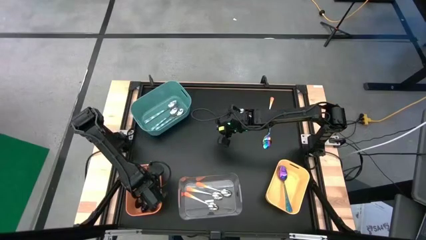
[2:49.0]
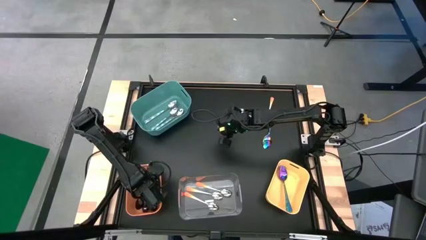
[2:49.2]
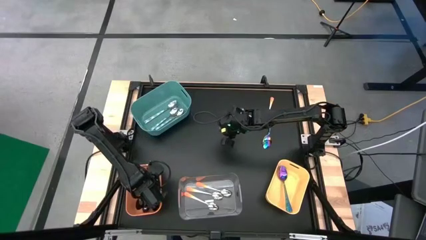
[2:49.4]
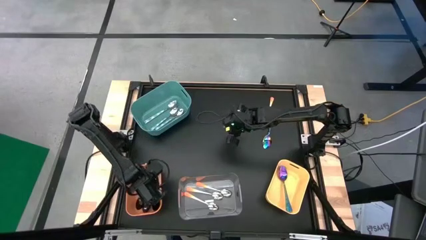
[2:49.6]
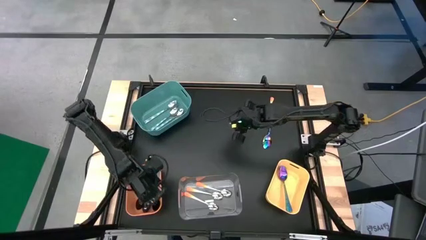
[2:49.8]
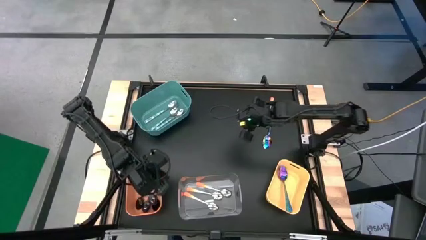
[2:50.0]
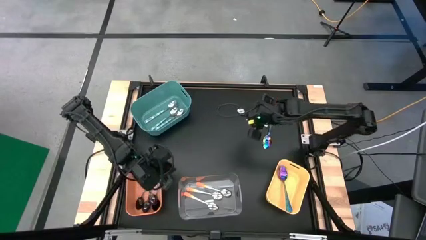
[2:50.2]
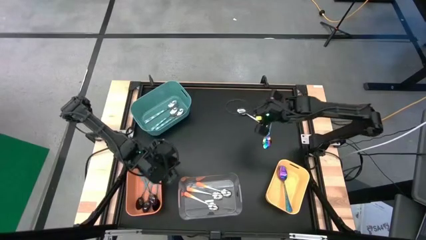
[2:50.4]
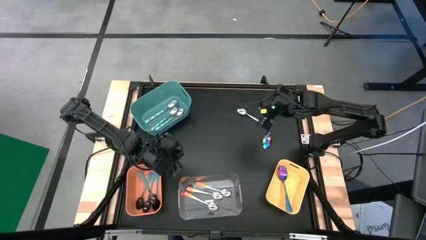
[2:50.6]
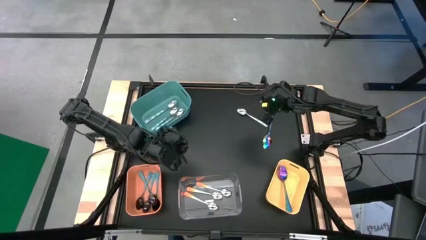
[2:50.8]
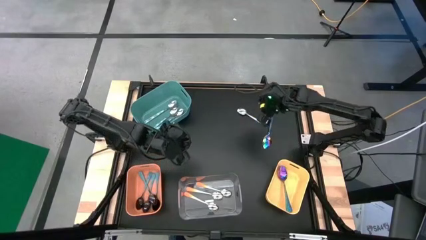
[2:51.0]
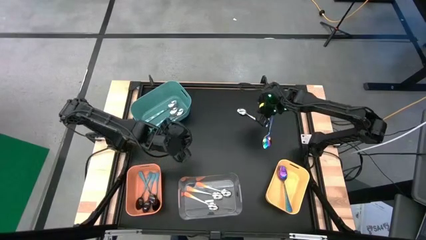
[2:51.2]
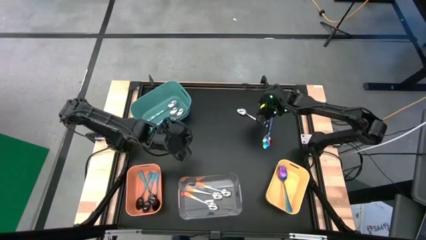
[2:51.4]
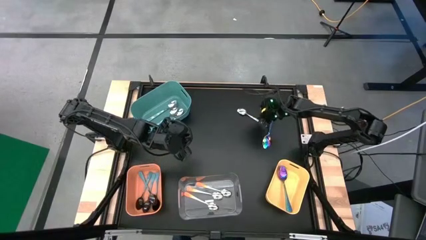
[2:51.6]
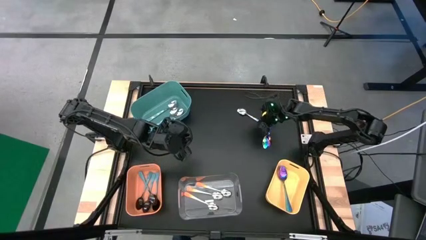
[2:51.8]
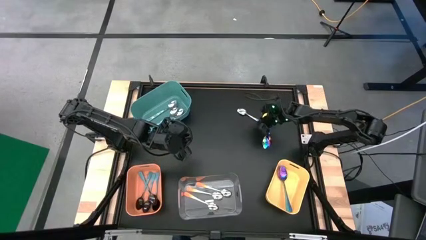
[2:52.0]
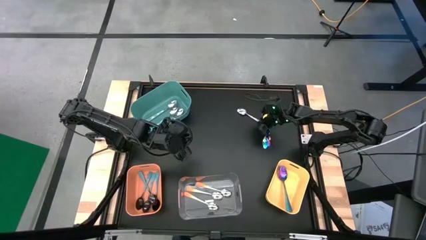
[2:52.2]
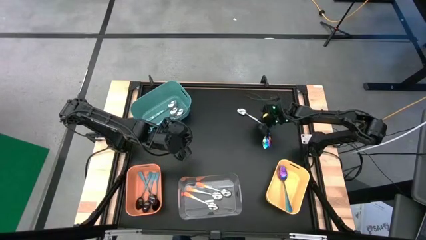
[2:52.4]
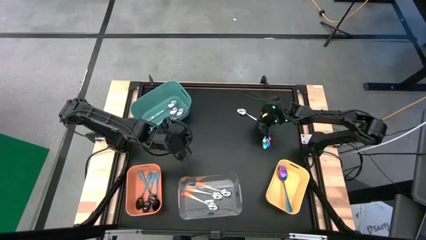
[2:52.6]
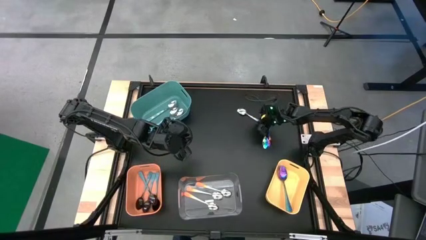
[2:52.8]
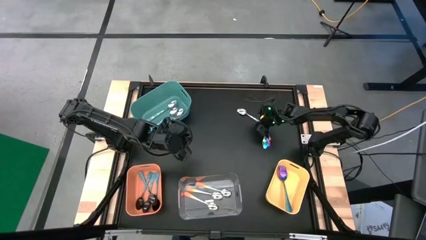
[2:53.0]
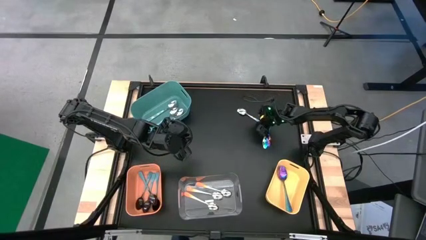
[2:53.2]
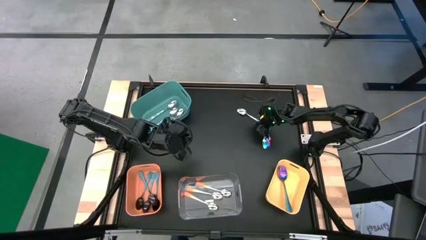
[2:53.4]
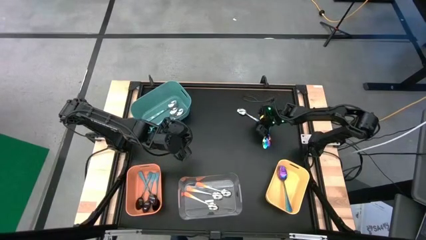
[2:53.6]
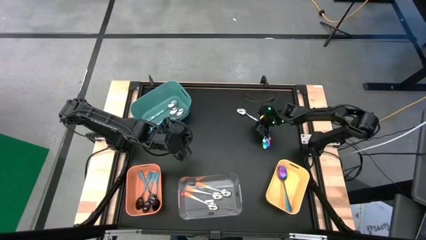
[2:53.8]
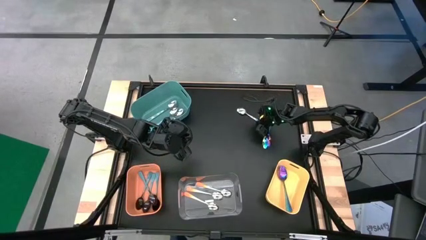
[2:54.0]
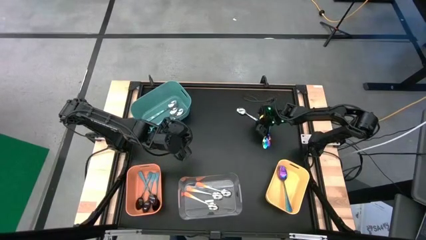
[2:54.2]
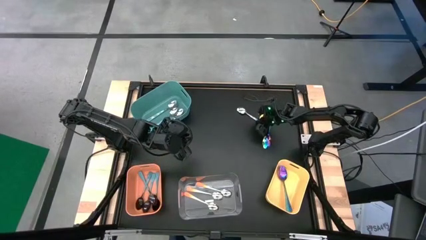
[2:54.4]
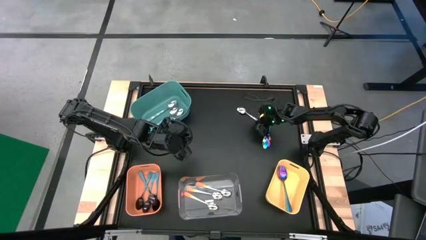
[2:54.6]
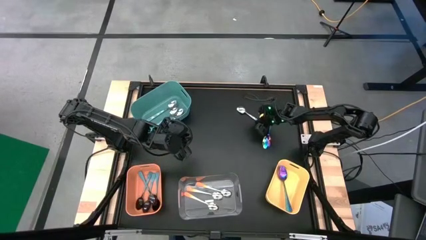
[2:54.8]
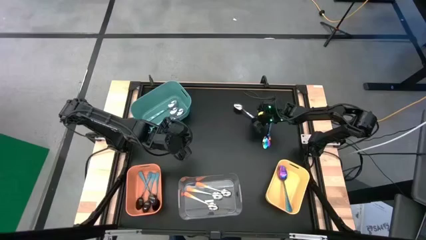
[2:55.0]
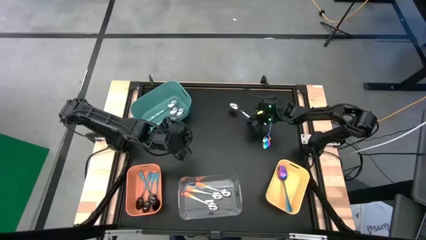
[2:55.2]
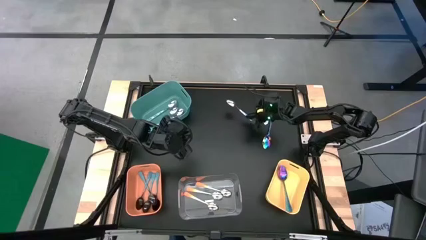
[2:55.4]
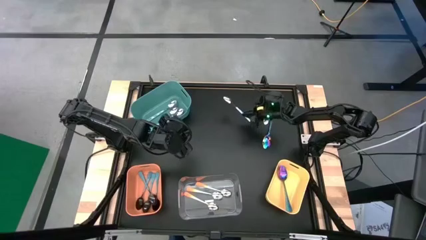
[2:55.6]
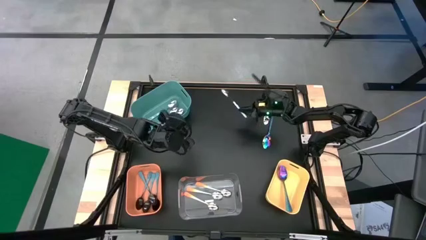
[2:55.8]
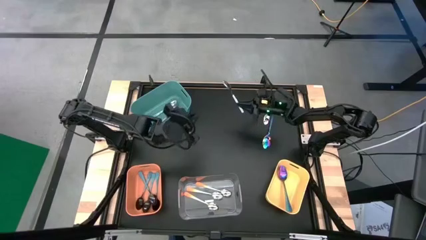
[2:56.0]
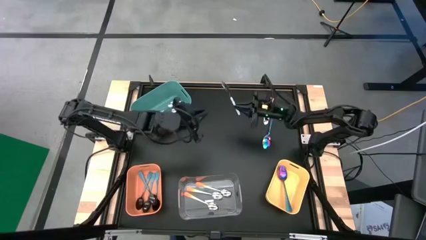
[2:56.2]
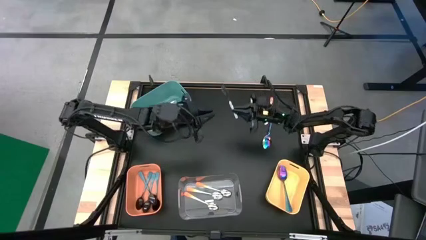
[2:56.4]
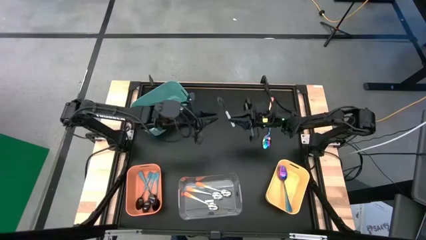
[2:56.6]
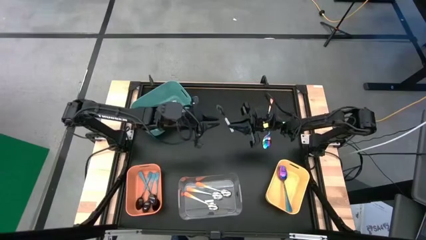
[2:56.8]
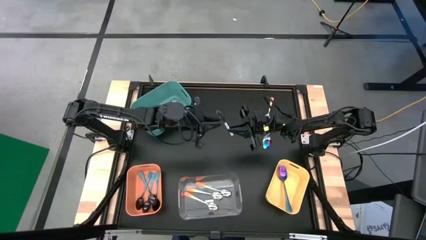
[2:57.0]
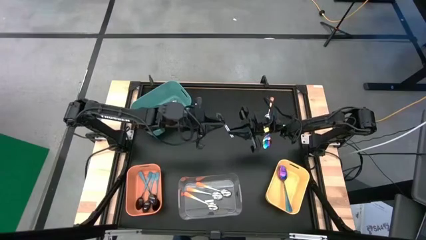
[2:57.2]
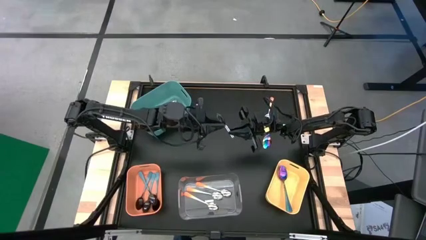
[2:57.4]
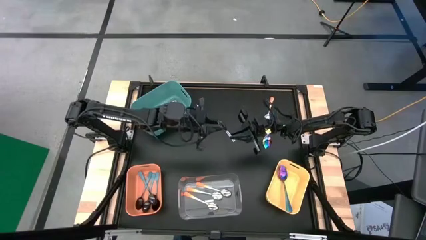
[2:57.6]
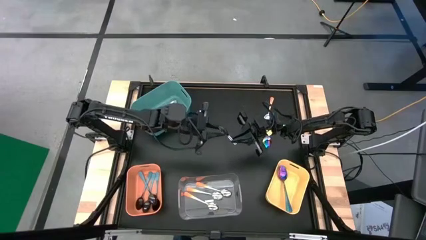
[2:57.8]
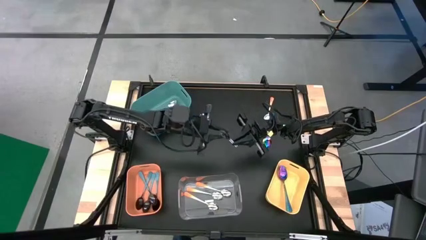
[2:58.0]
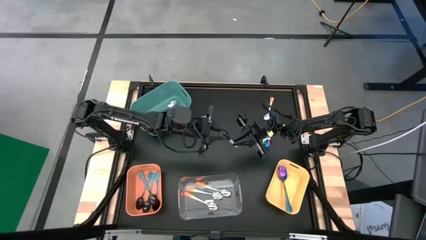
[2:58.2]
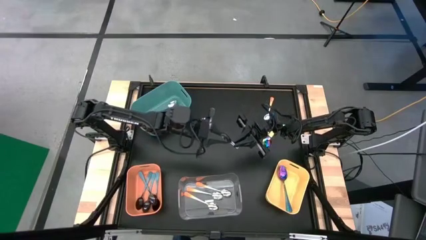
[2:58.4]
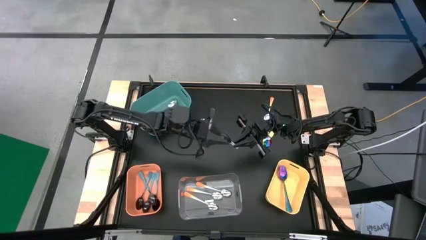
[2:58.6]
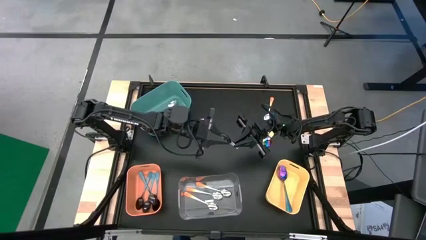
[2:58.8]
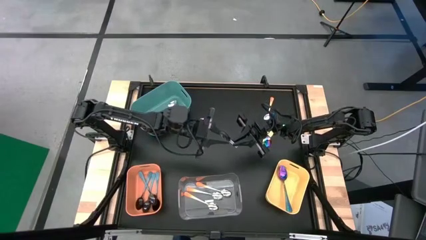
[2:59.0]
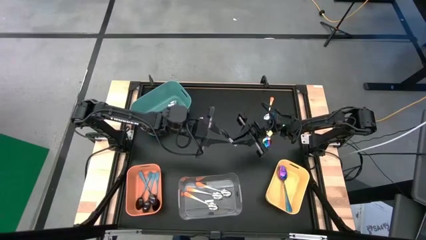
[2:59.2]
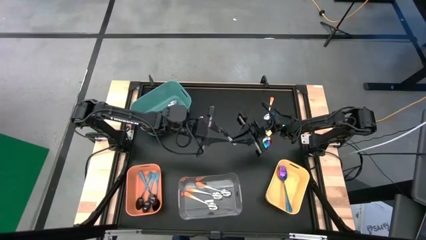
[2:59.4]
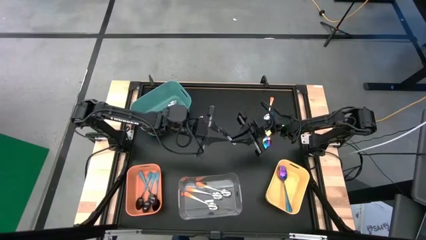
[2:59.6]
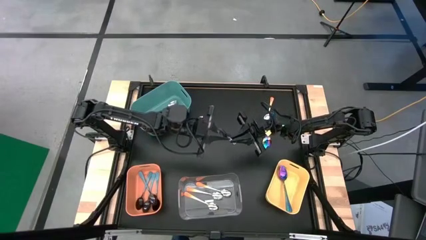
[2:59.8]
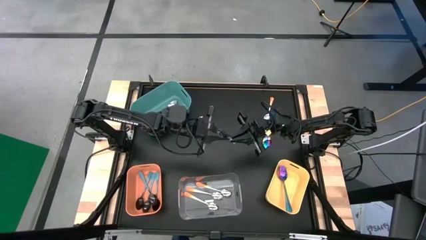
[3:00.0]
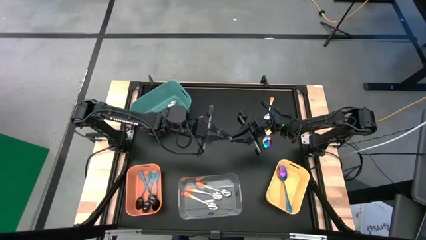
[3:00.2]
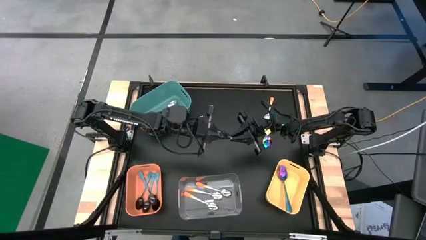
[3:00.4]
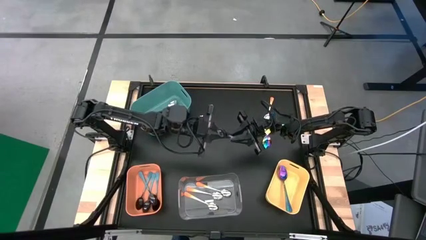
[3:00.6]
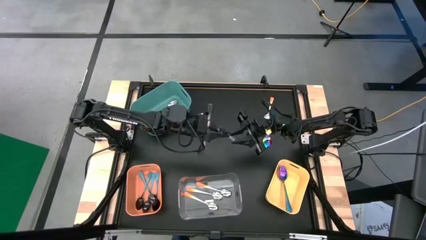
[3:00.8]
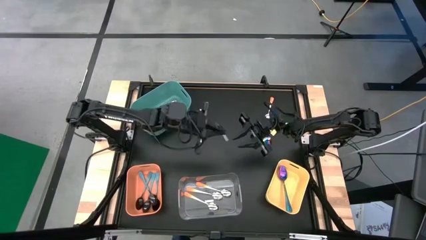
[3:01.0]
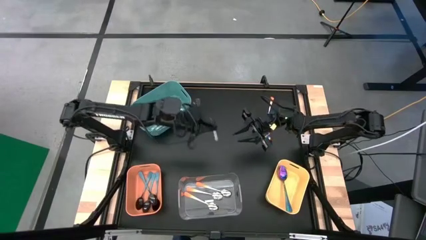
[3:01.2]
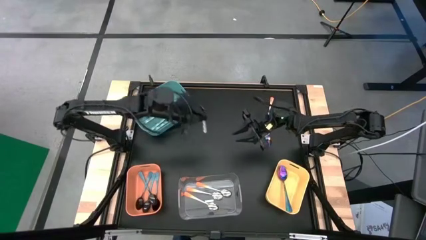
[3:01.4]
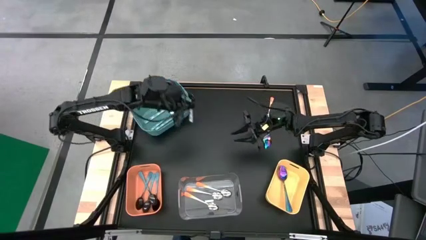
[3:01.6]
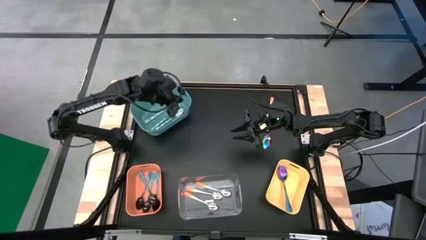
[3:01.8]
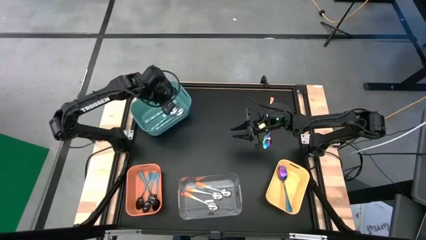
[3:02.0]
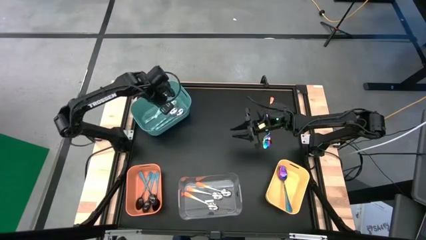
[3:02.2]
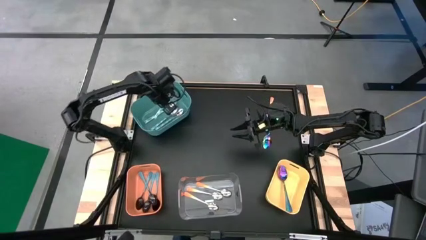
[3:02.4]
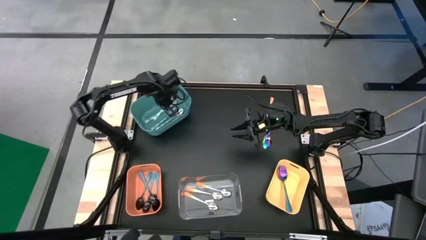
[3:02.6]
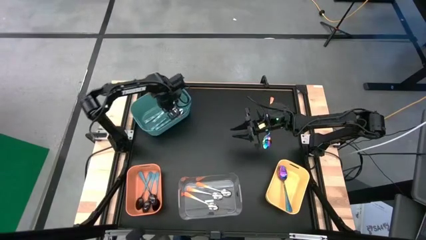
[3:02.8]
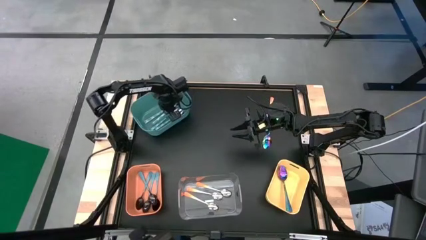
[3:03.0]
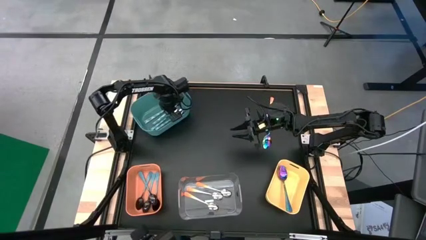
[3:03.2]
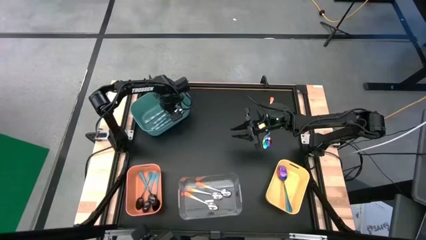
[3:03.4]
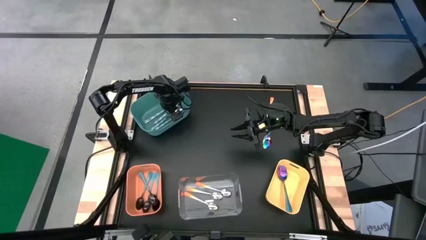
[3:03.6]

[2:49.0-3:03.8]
Task: Sort silverware by color (type)
Put the white-green spoon into the blue bin
